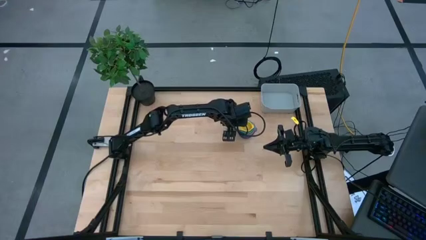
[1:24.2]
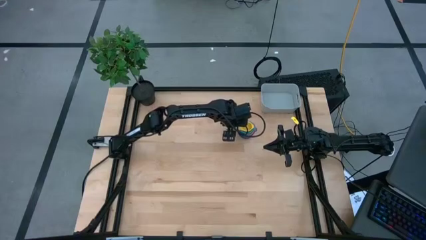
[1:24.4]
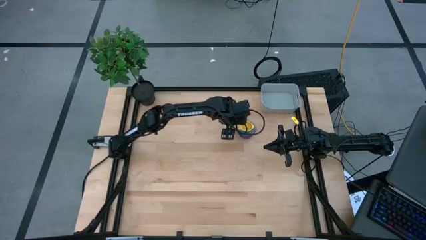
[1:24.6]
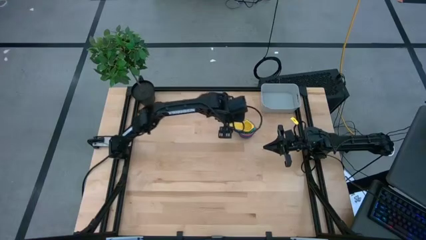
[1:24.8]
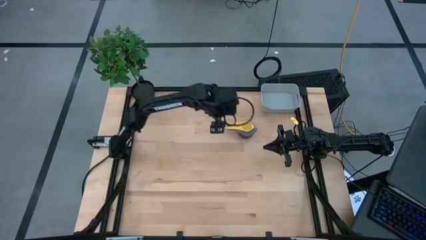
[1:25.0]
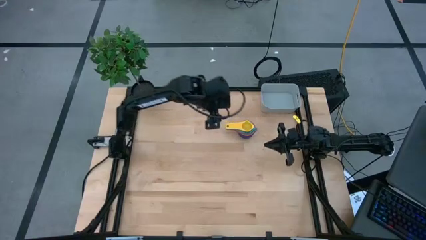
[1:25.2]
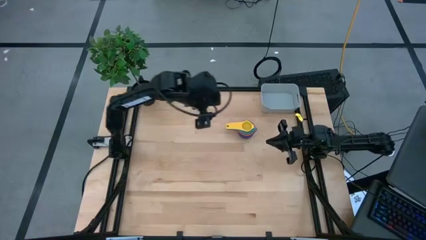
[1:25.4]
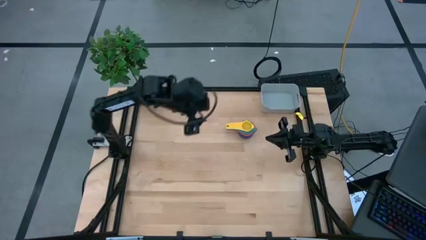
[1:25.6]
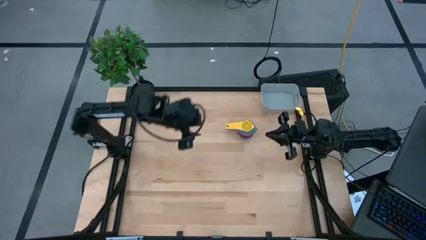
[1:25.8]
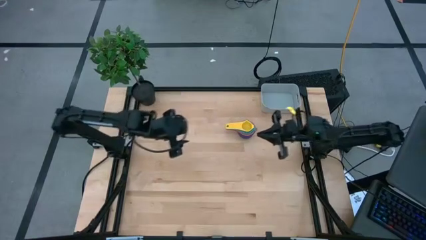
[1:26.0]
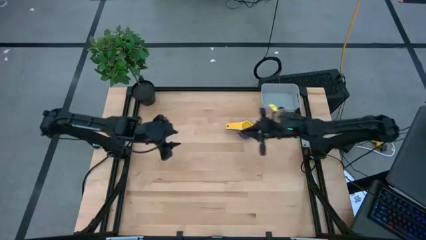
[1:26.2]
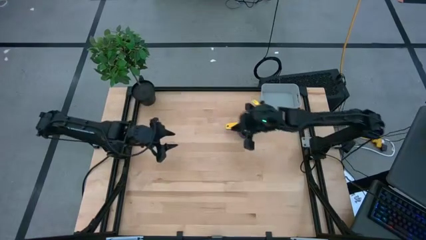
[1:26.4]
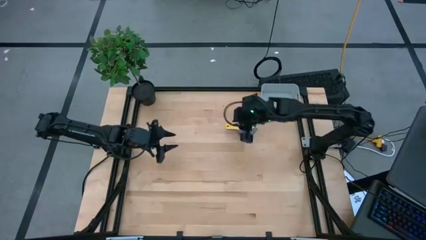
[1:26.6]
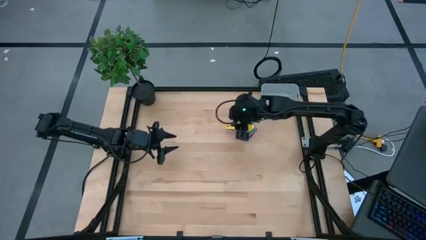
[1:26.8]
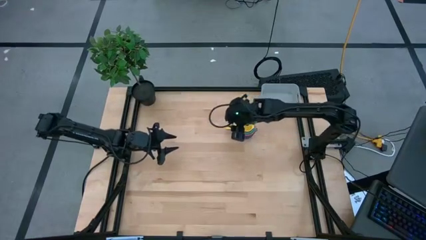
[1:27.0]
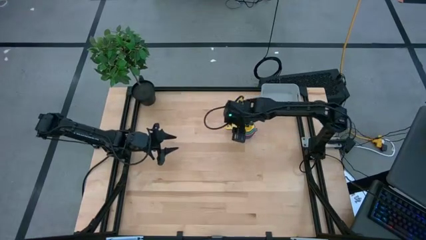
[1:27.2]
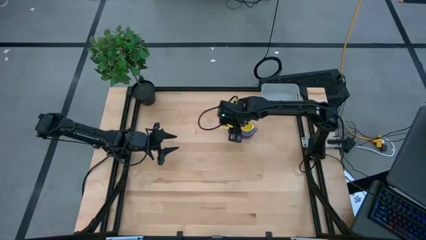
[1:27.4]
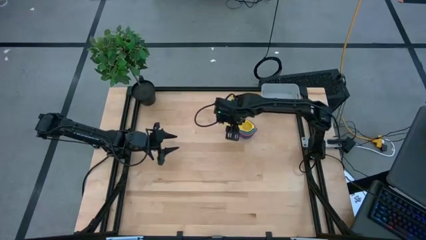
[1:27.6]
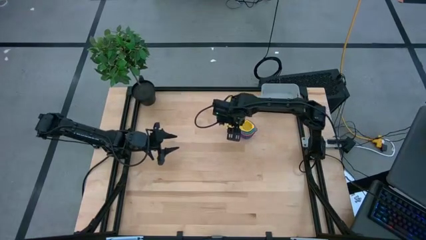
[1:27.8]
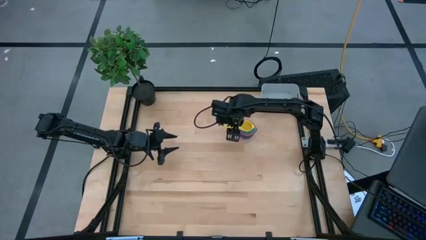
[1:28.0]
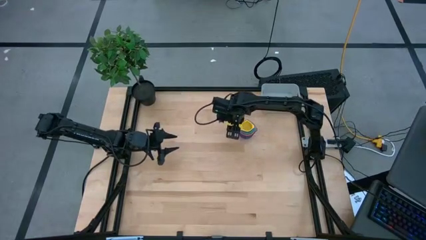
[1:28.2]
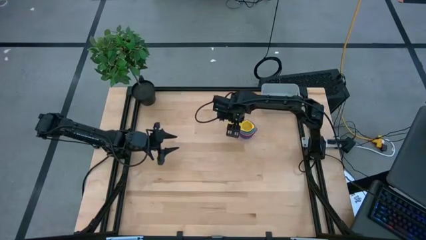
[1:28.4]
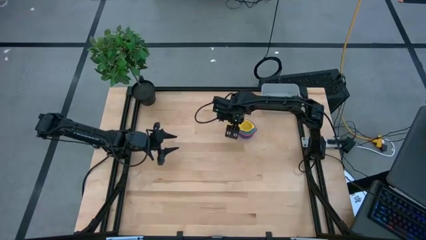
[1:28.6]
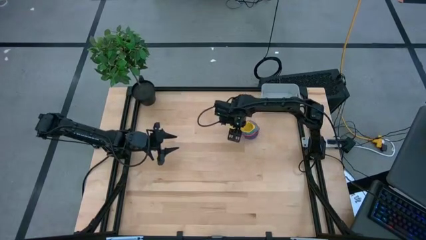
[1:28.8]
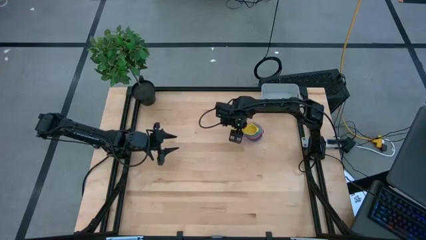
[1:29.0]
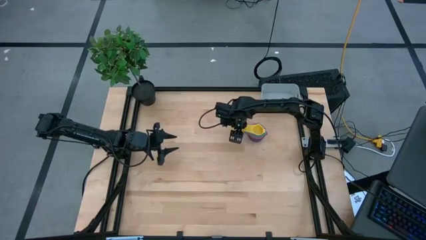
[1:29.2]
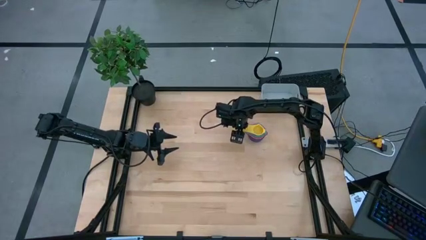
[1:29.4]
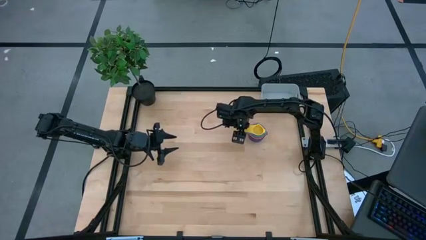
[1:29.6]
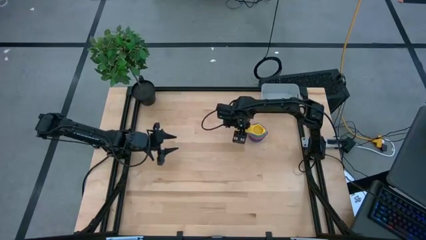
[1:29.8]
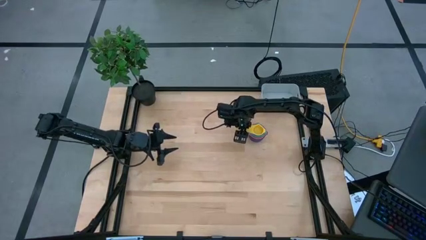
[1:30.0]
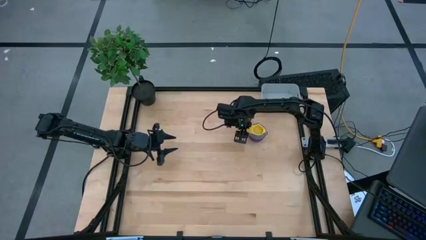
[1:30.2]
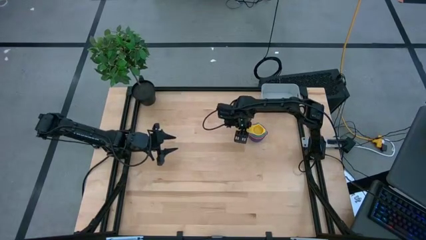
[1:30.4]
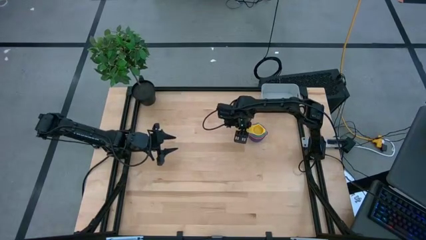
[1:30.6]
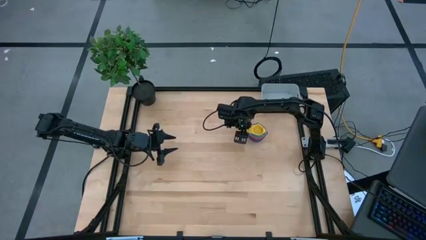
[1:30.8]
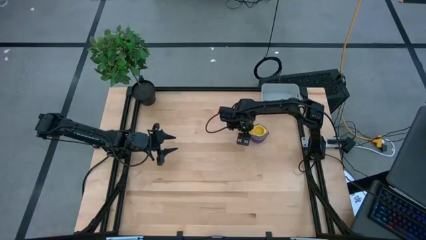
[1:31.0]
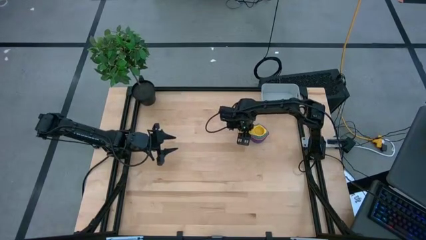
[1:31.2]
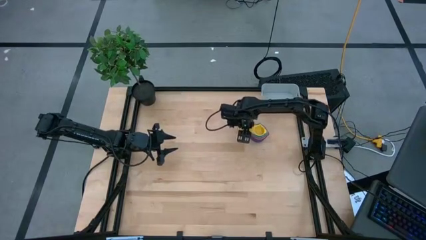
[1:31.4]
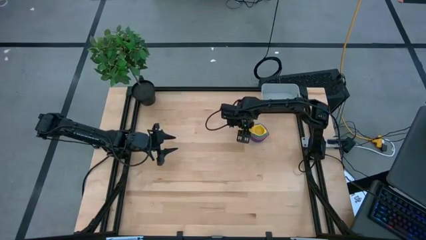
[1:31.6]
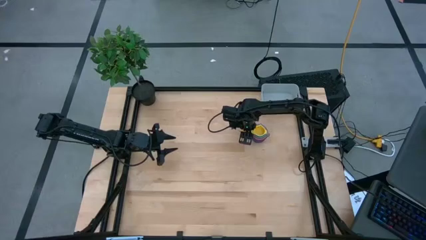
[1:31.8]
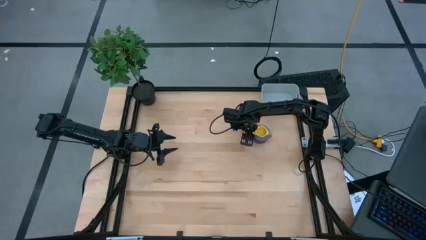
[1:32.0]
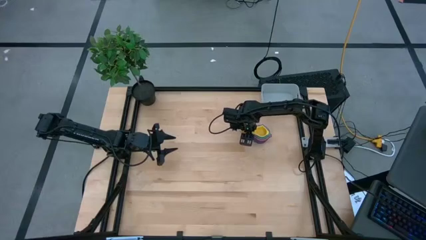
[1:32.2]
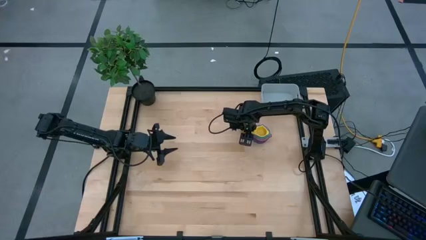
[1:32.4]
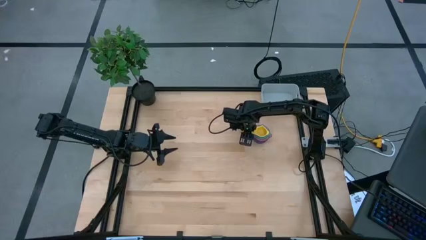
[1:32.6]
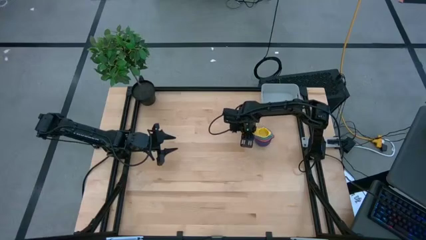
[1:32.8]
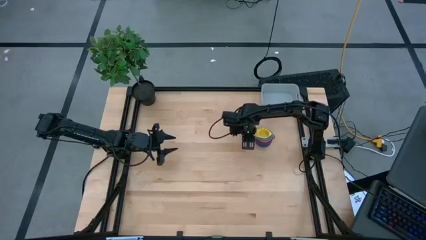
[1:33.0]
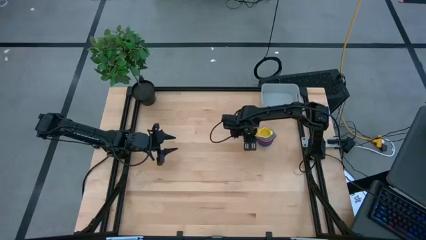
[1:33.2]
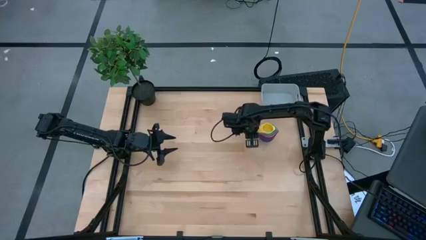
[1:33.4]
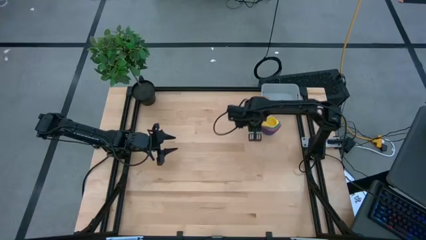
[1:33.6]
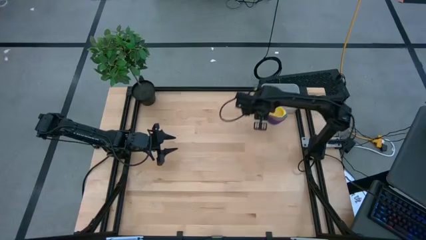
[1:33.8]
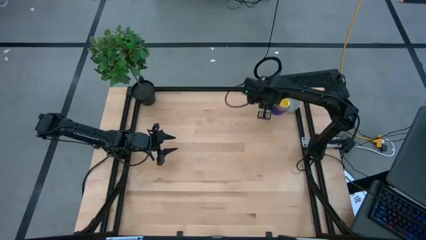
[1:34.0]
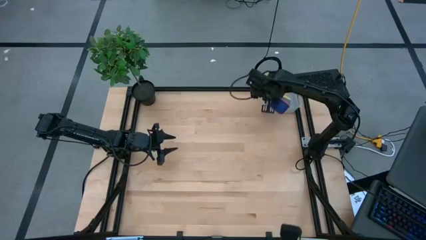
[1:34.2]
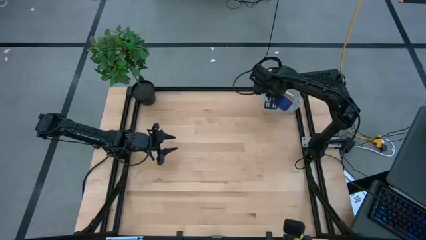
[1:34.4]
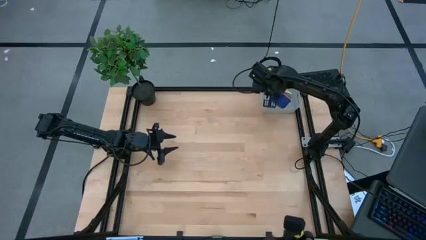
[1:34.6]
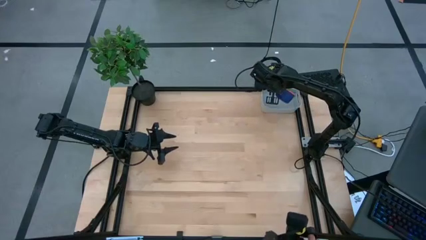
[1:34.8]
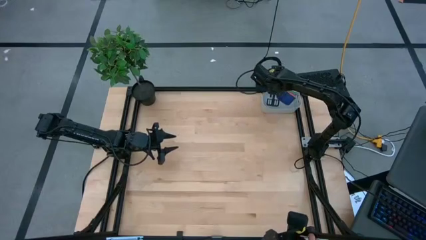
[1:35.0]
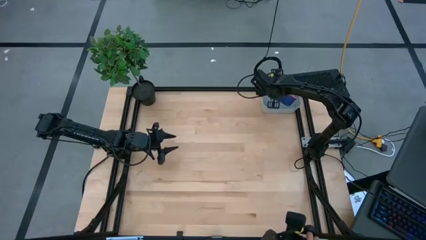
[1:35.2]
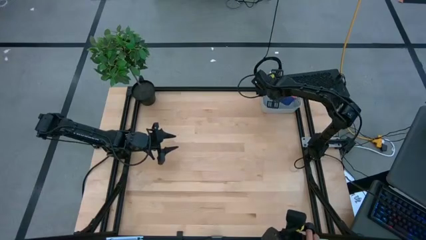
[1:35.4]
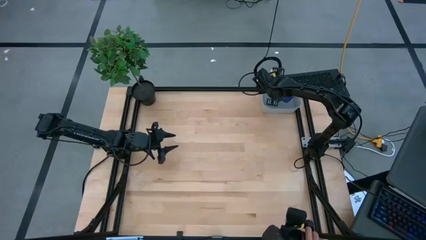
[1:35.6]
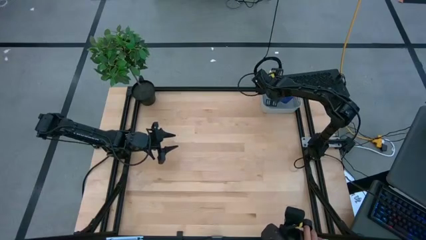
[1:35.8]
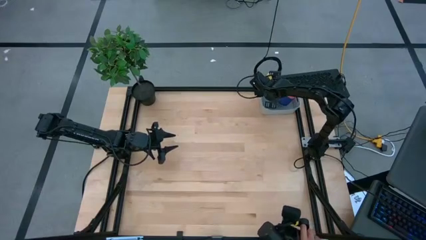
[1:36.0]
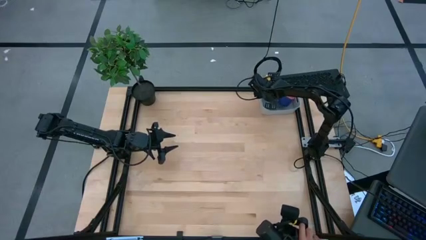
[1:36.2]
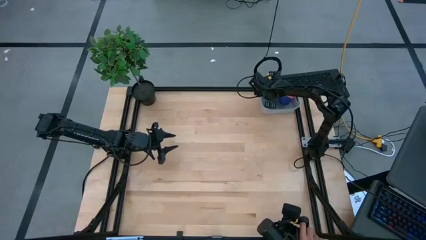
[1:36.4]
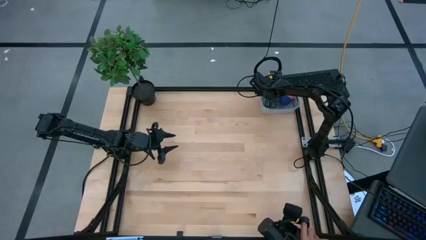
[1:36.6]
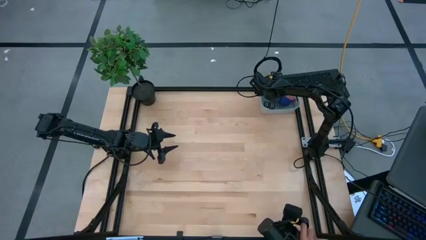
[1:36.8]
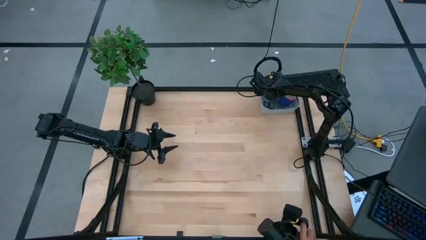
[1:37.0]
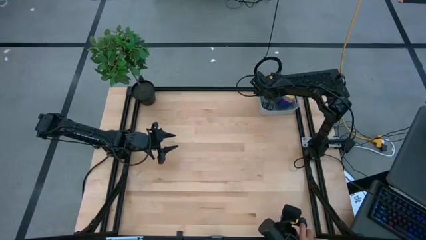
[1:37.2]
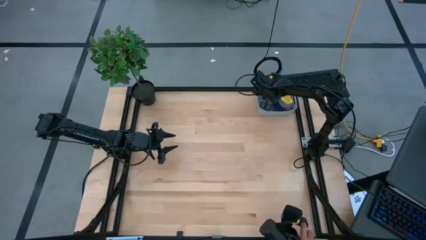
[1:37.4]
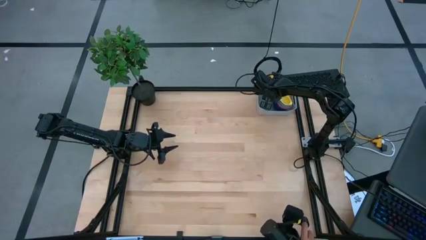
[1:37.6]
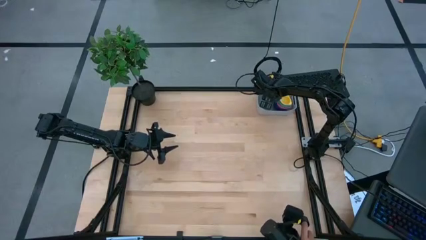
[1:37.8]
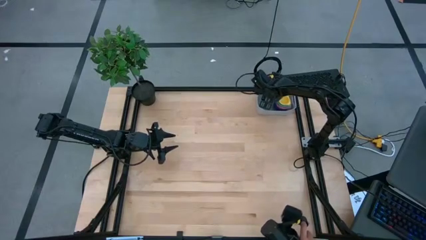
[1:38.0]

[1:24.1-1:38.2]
Task: Nest measuring cups in basket
Put the stacked colored measuring cups into the gray bin

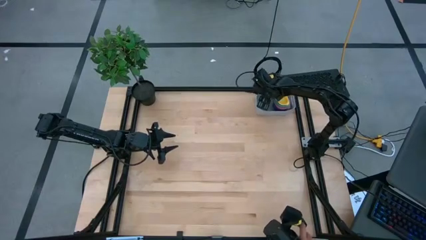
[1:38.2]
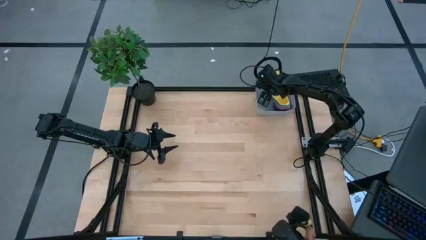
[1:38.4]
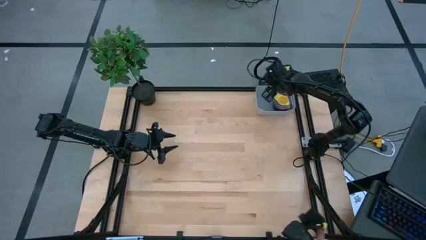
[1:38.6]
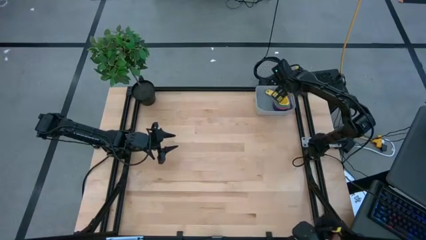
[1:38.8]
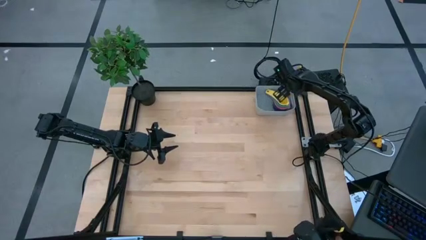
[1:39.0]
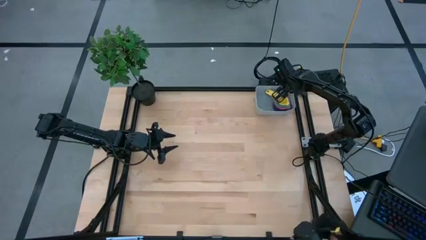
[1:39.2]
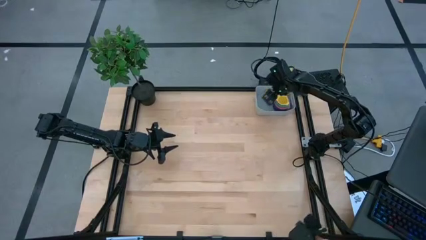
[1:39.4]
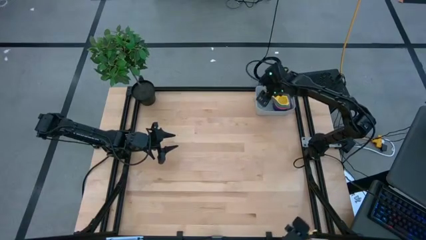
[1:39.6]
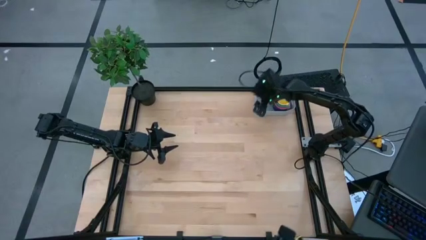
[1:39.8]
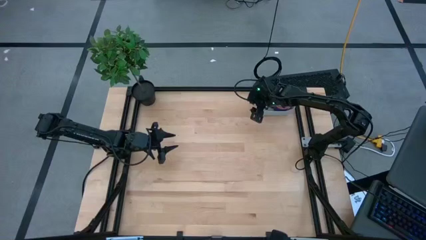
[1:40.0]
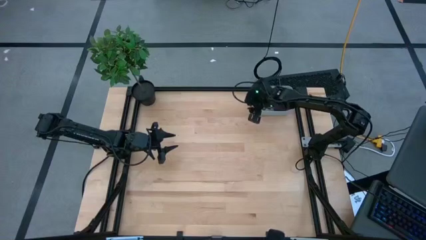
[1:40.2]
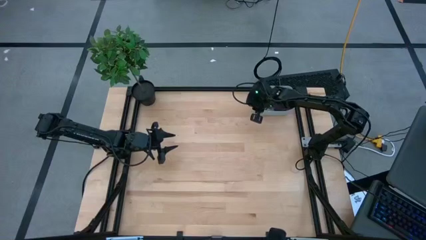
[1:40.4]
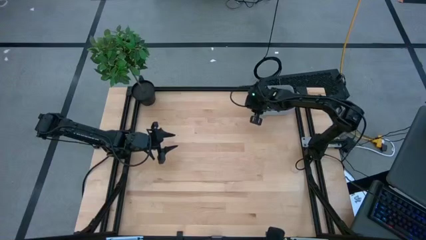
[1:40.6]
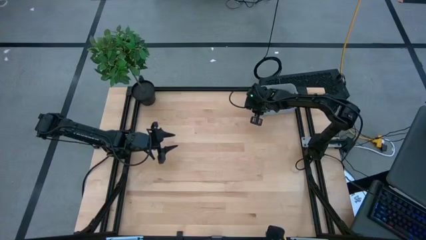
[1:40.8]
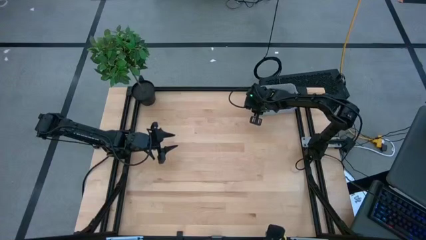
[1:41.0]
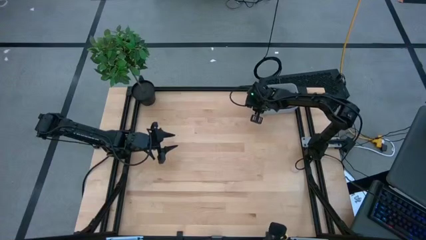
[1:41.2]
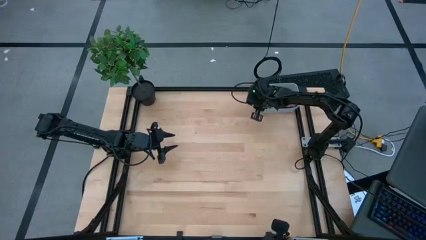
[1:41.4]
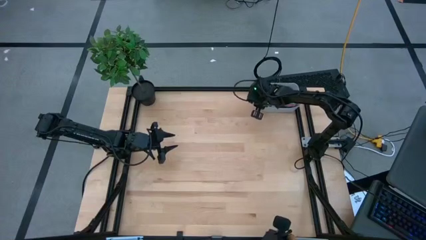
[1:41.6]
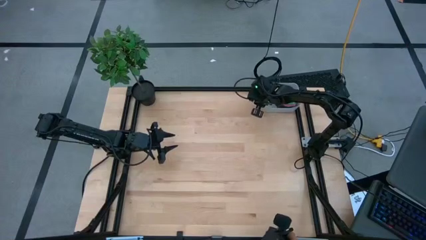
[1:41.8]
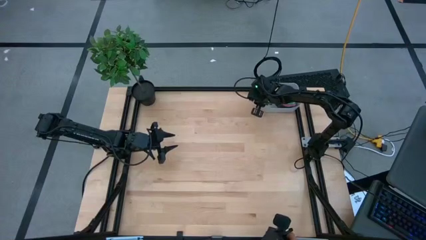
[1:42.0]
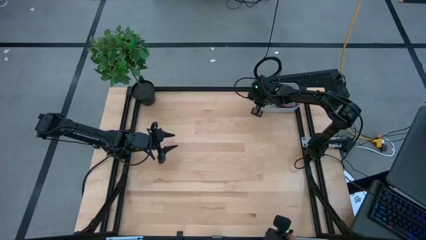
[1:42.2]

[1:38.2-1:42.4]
Adjust the gray bin
